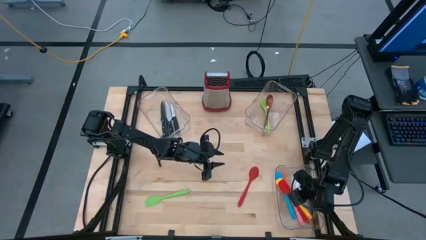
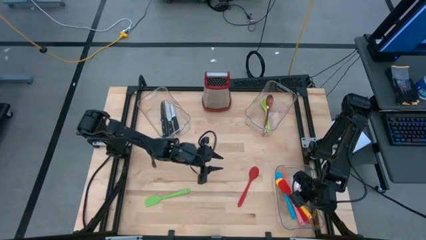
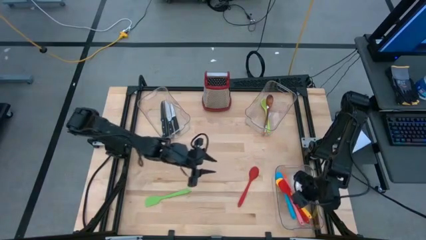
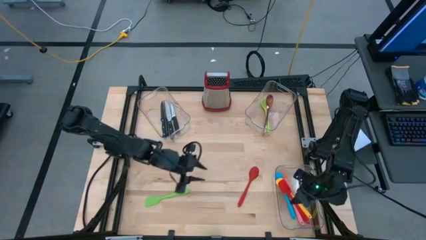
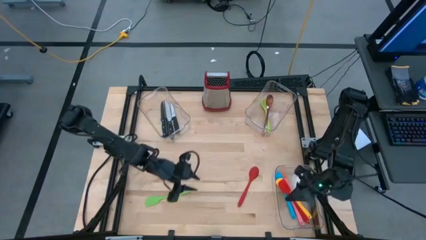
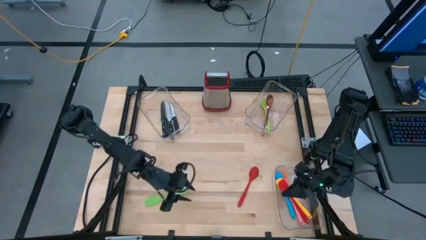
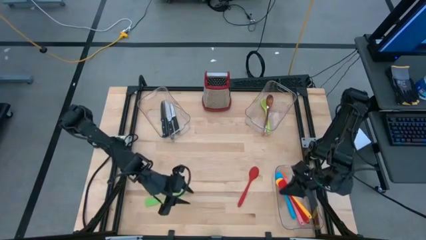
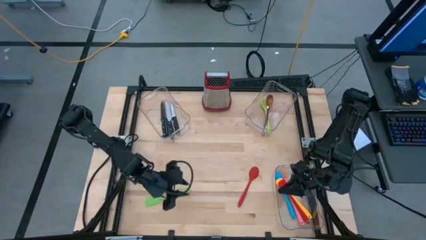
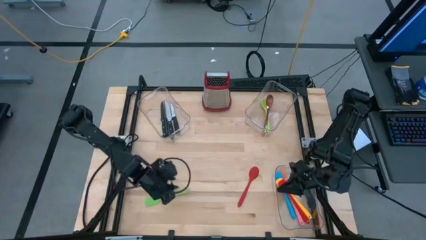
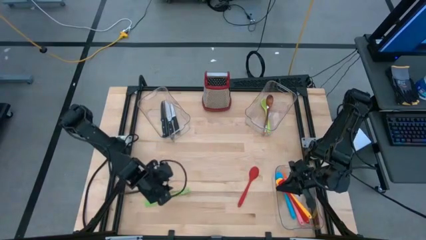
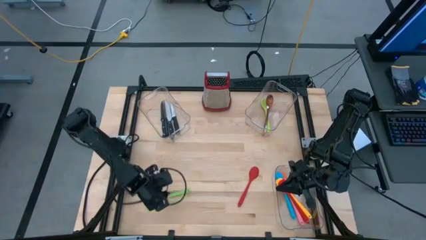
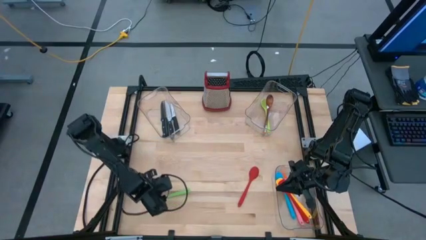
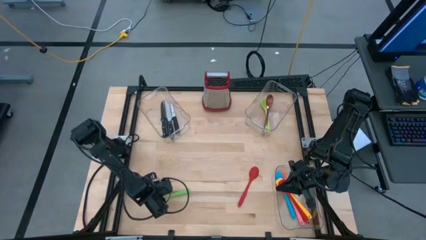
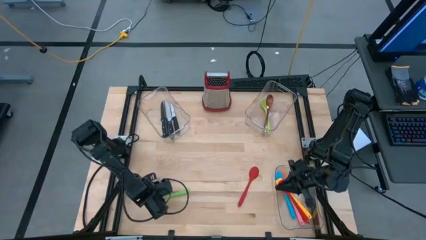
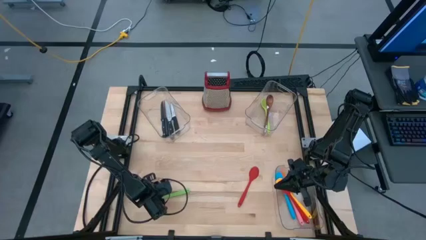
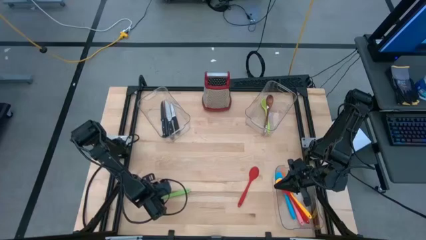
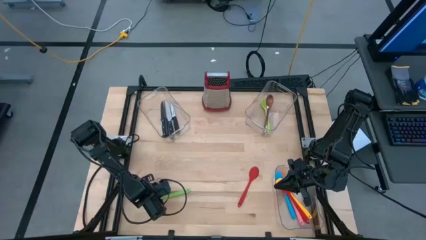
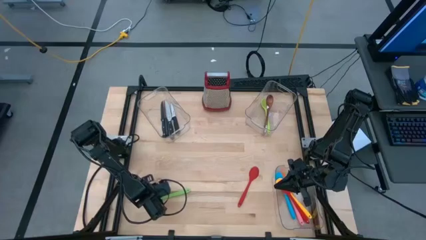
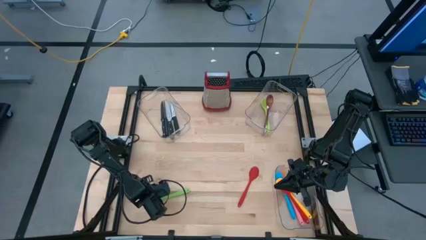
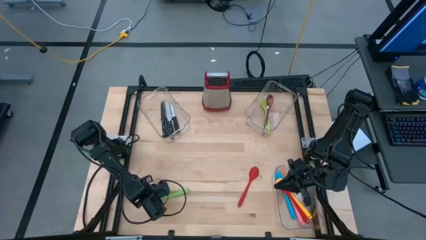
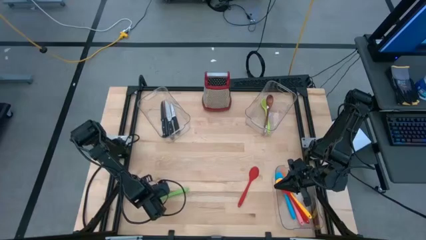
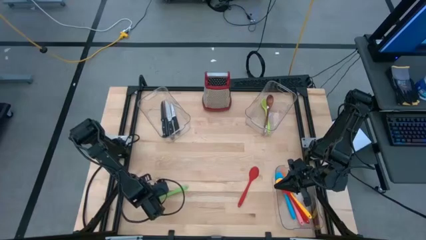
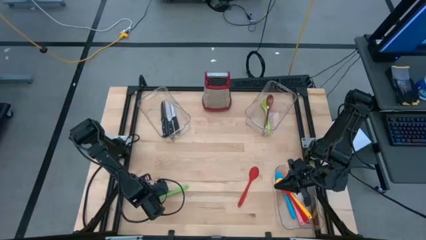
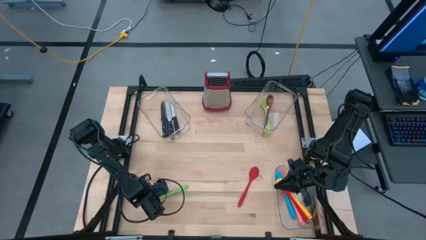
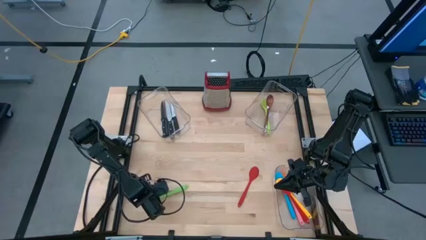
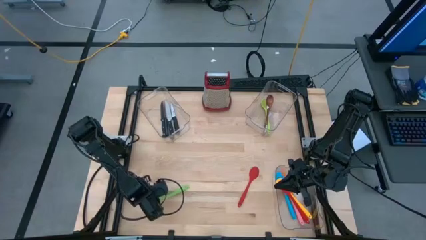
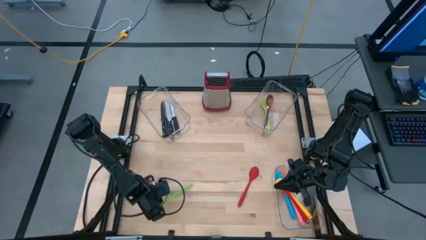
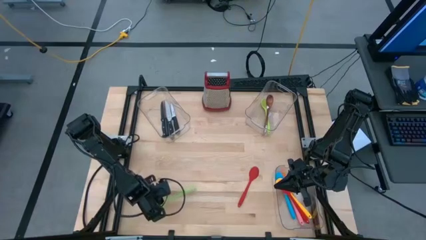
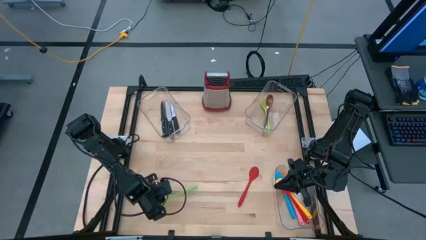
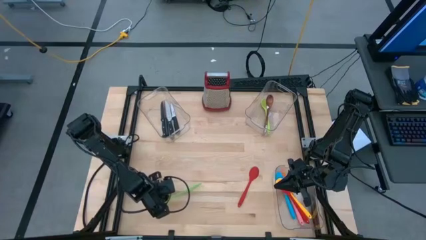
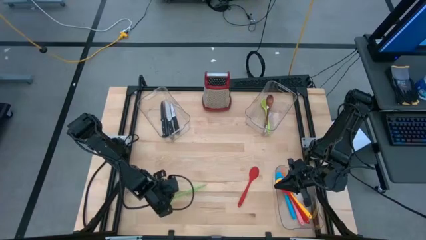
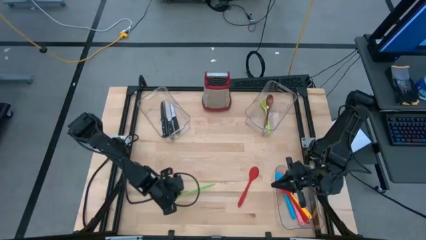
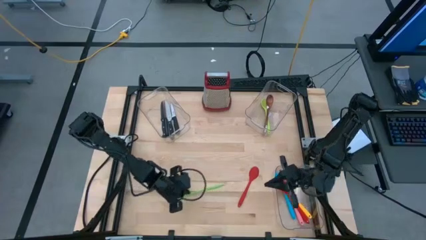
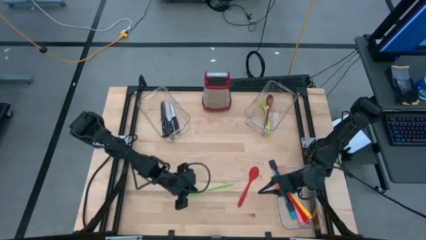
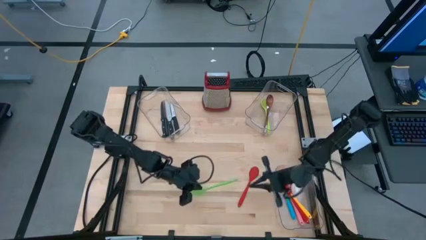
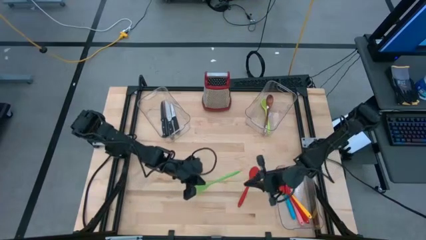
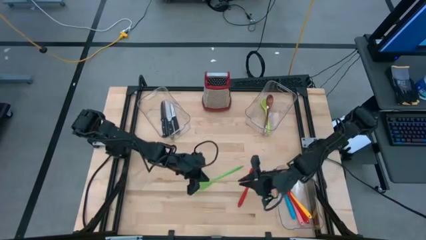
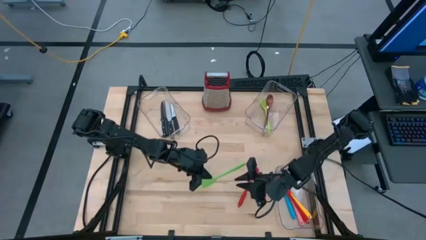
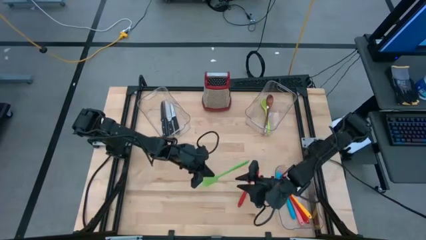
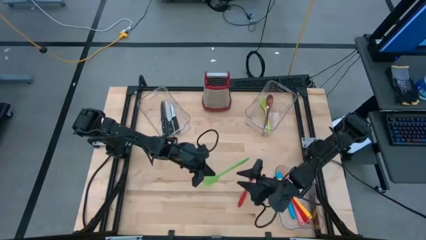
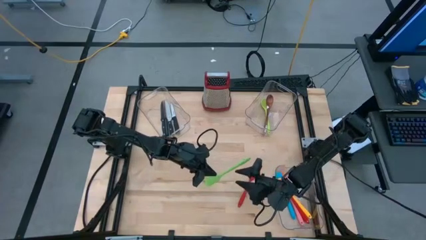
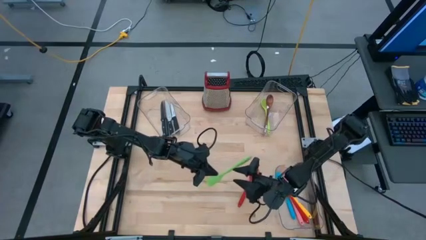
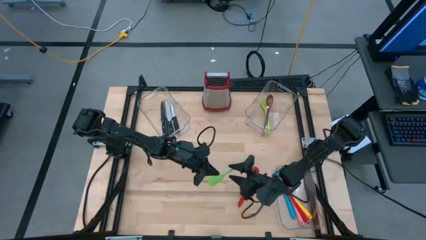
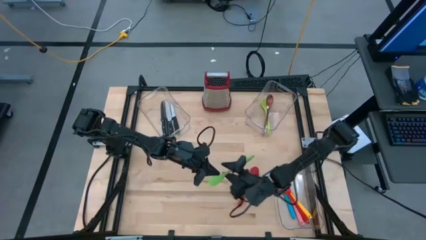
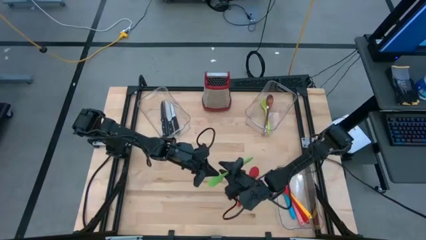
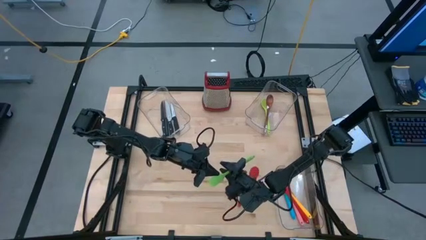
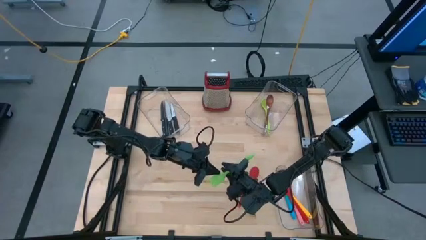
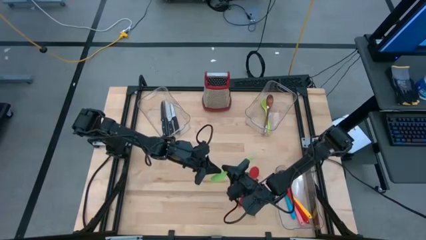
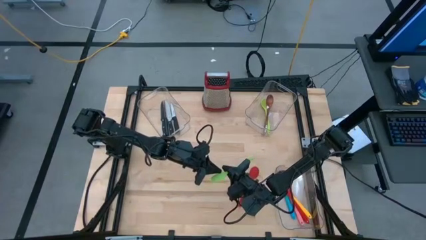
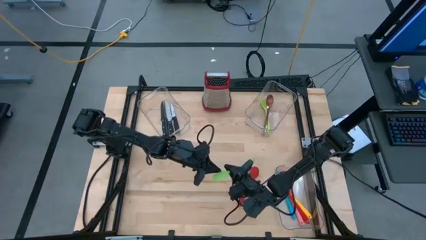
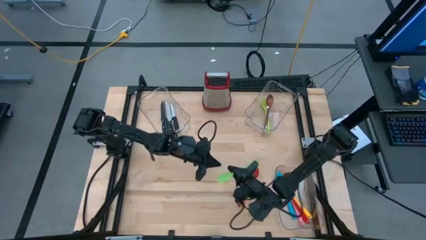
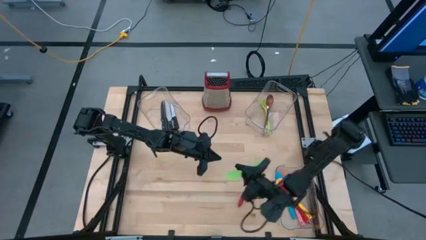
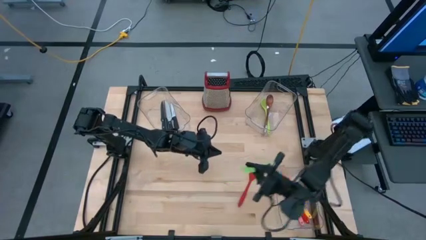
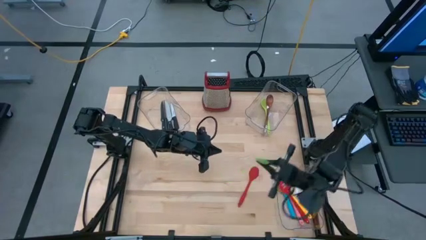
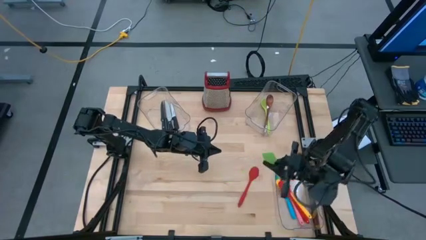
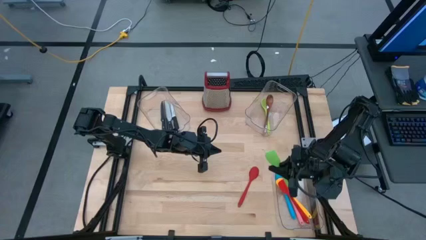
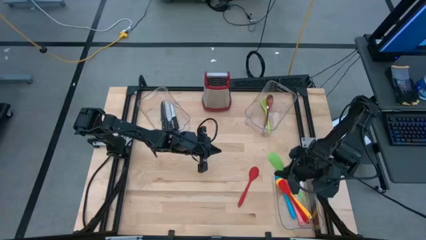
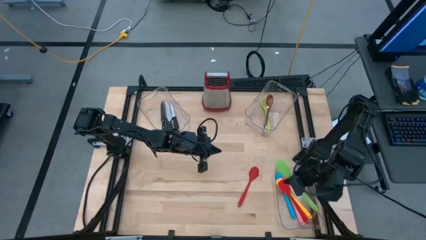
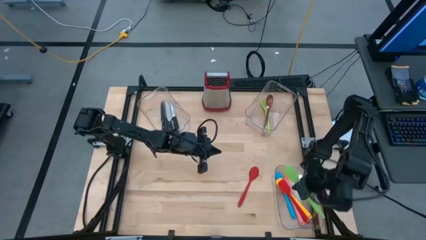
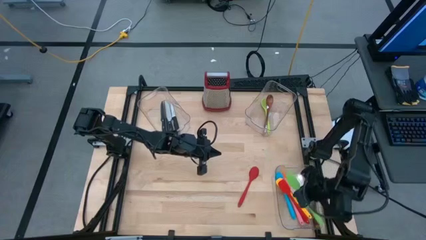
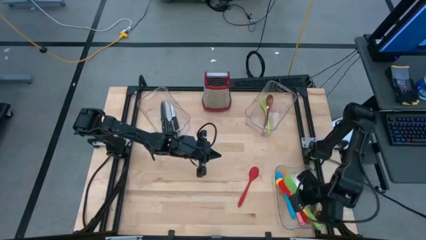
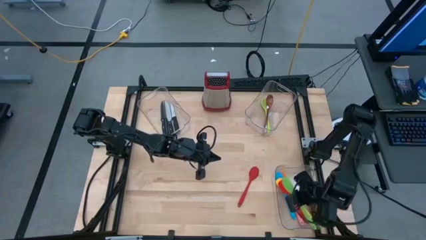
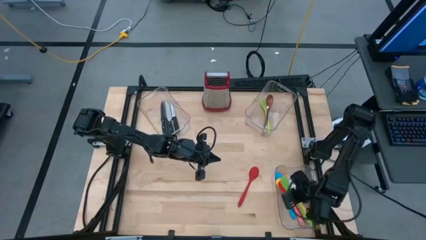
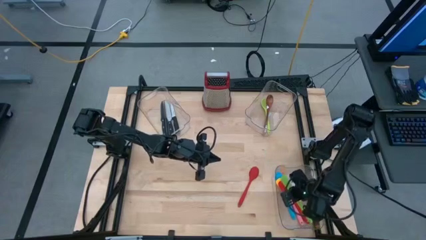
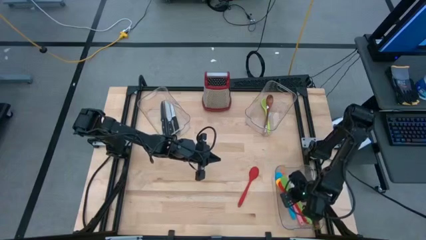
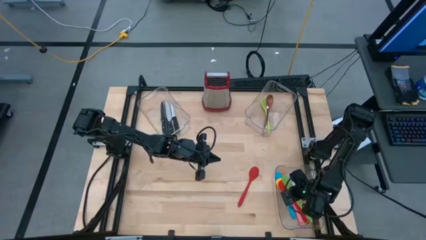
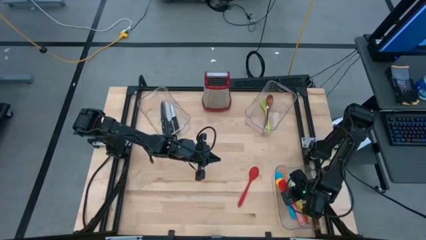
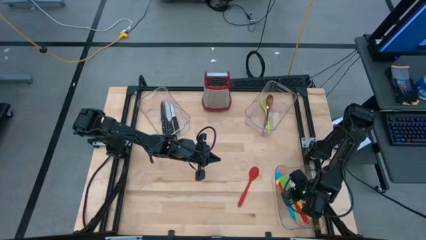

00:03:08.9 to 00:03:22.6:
Task: Pick & Place Kitchen Items
Put the green spatula into the bottom right transparent bin

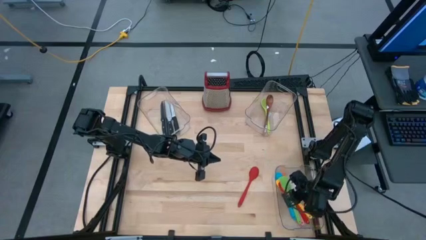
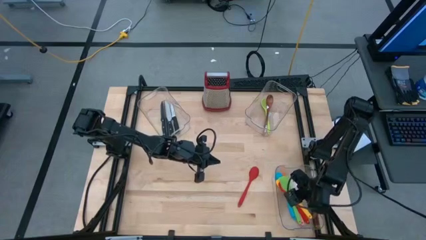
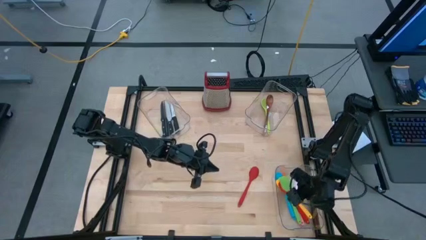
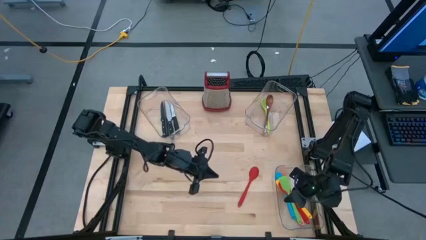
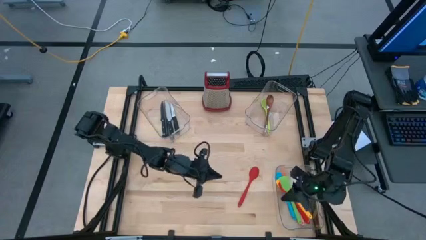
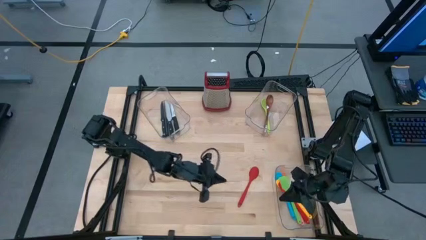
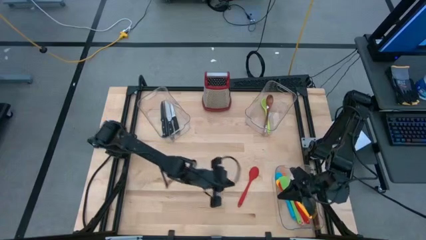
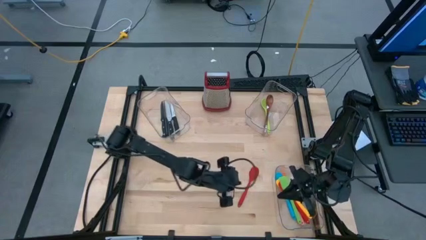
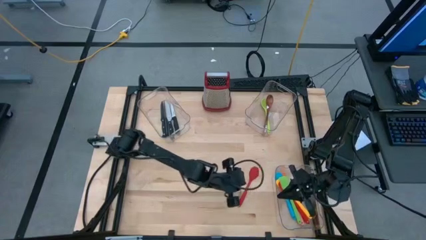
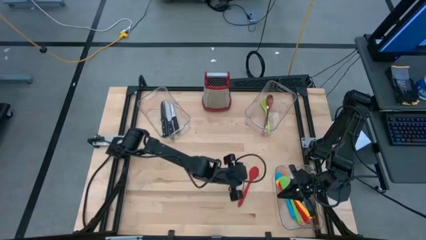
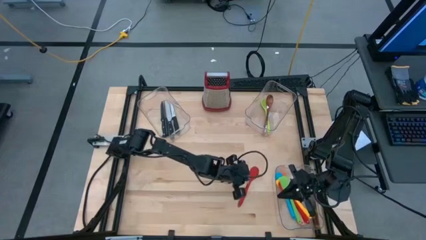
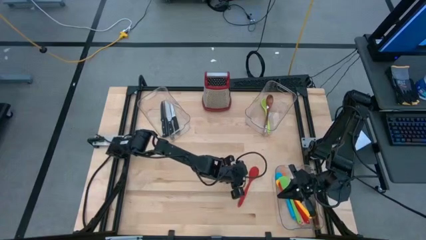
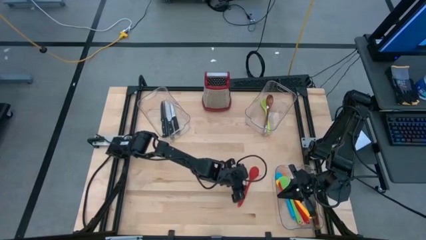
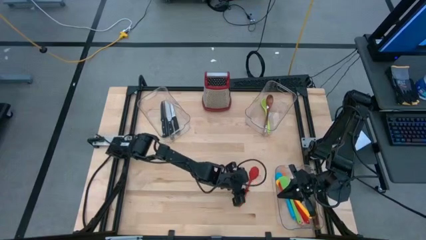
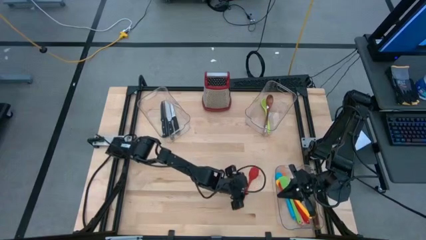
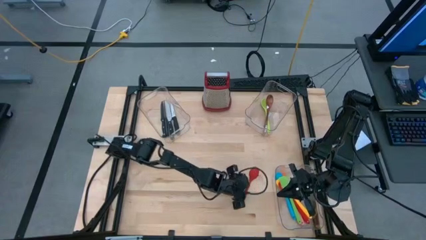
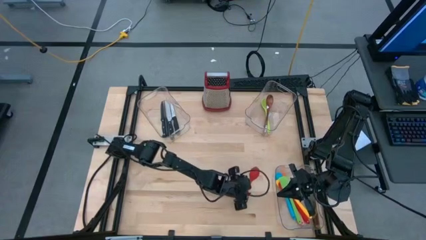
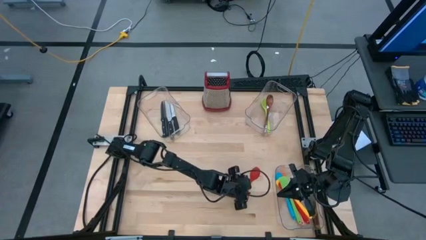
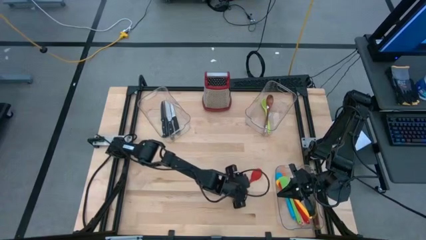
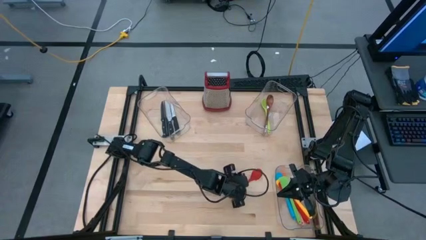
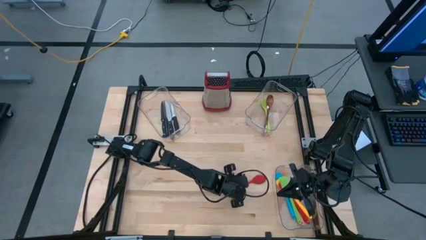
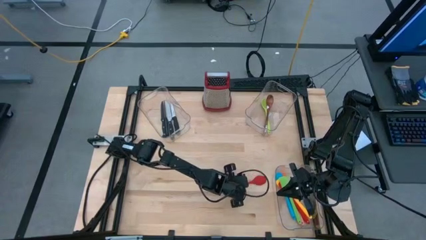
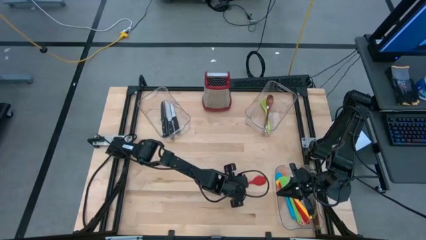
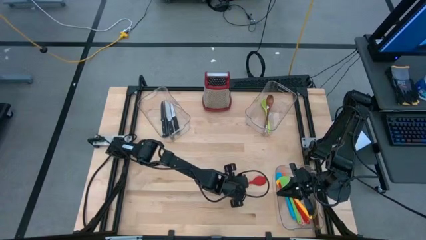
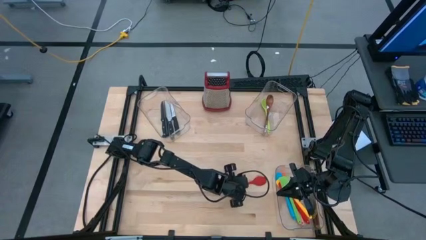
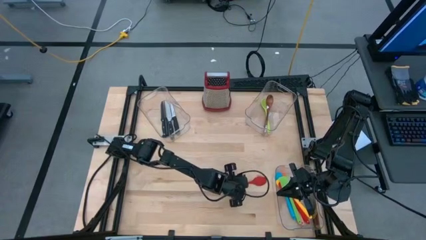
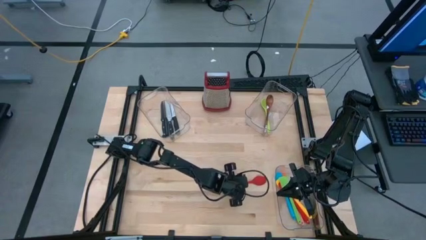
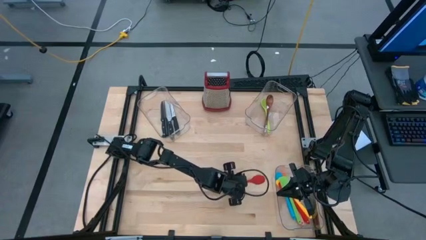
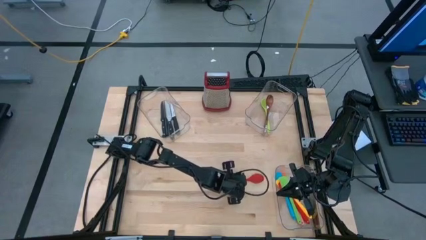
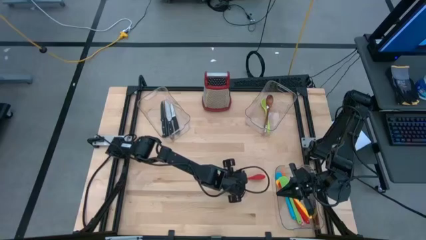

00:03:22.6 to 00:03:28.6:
Put the red serving spoon into the top right transparent bin
